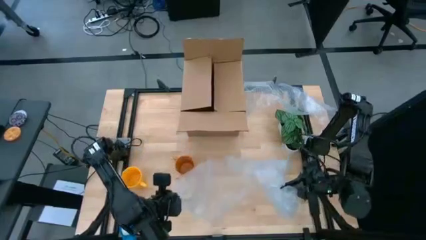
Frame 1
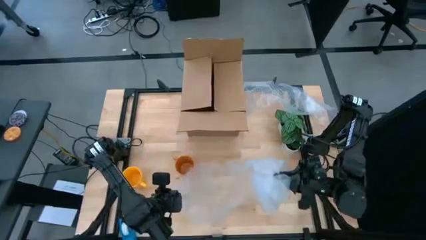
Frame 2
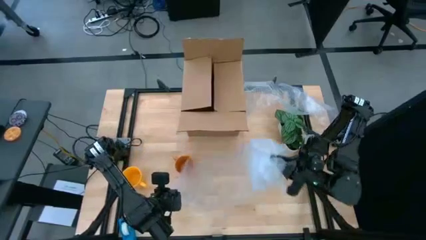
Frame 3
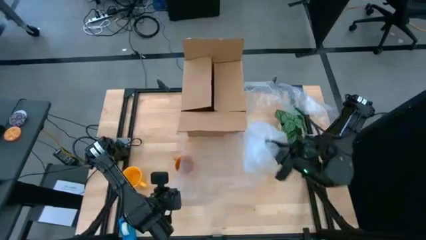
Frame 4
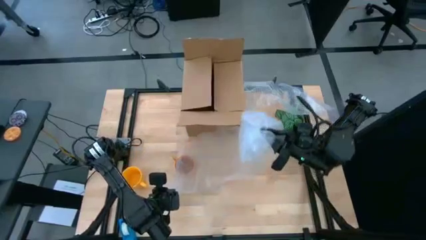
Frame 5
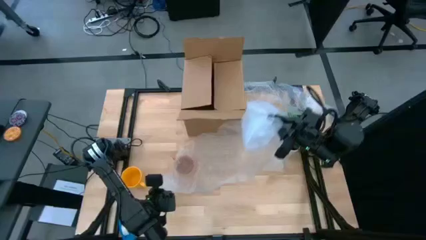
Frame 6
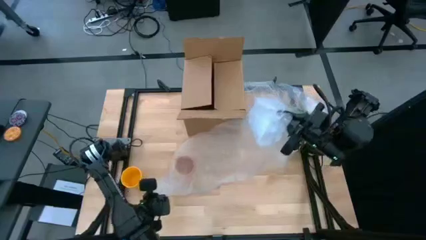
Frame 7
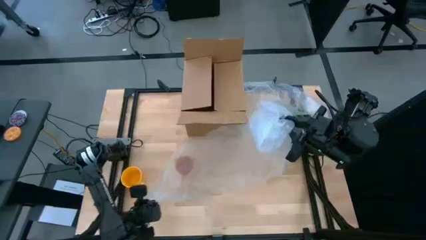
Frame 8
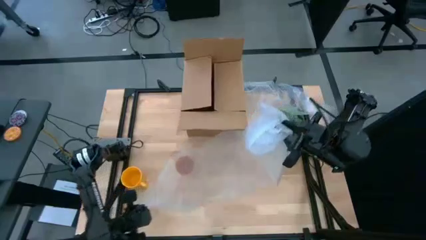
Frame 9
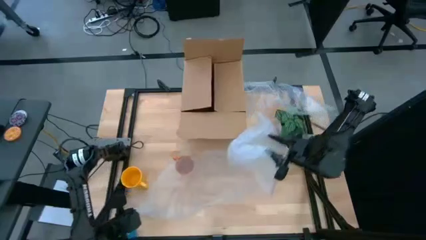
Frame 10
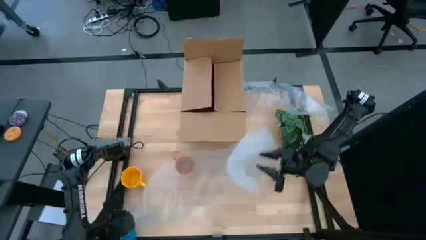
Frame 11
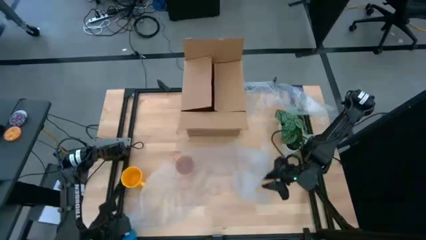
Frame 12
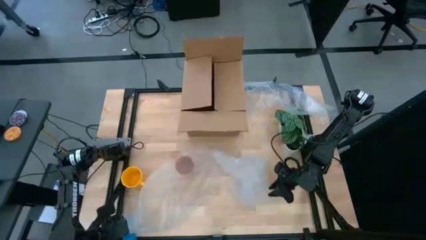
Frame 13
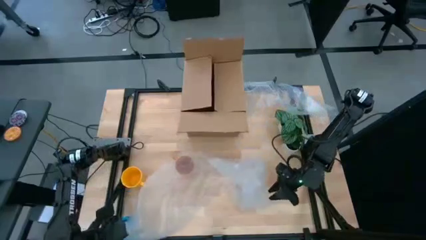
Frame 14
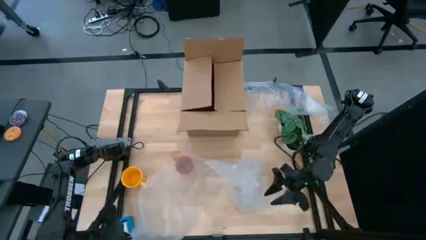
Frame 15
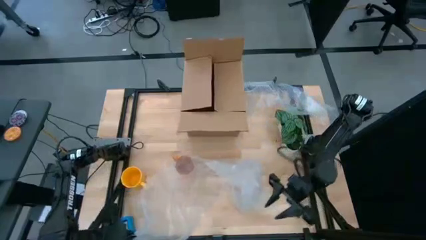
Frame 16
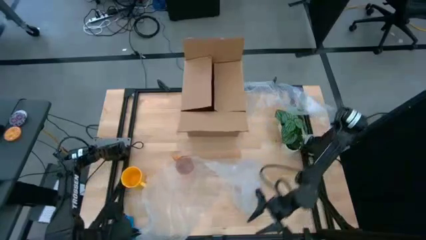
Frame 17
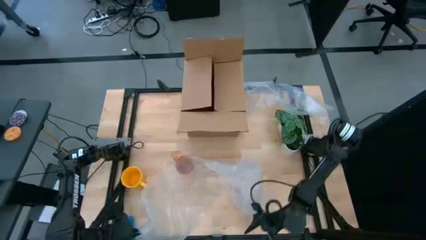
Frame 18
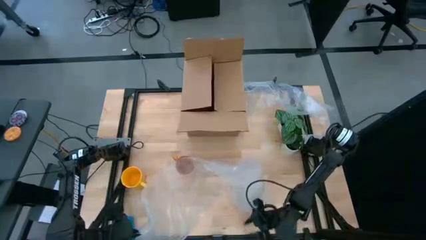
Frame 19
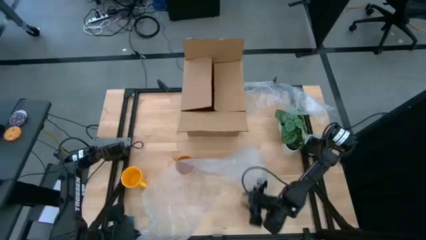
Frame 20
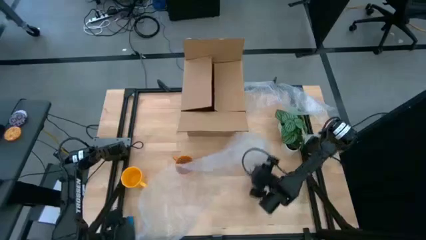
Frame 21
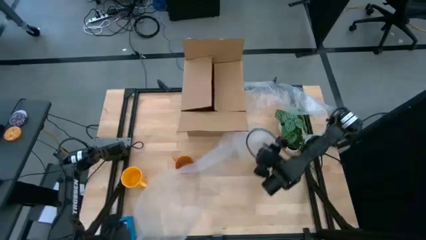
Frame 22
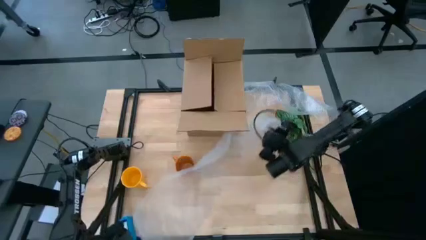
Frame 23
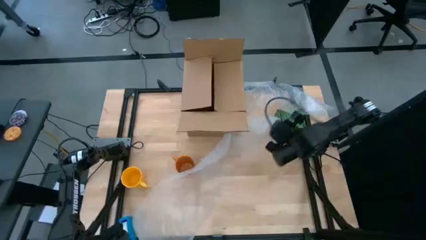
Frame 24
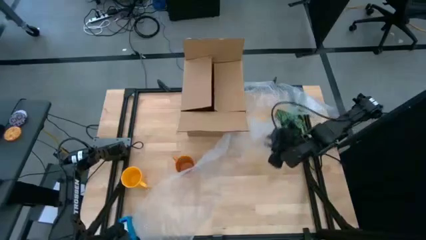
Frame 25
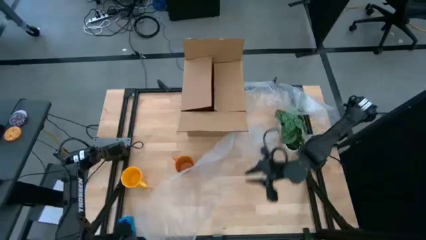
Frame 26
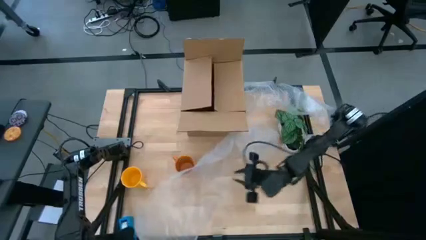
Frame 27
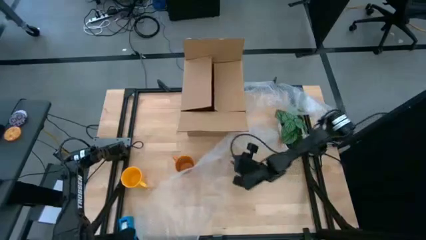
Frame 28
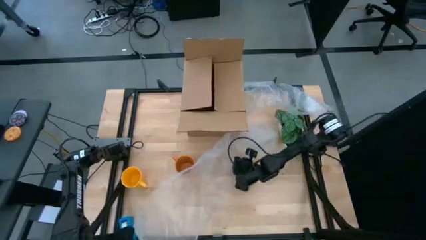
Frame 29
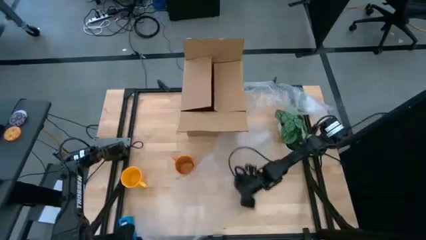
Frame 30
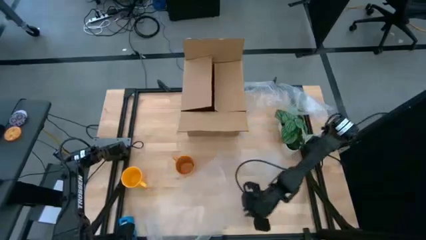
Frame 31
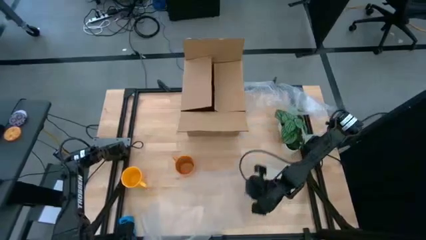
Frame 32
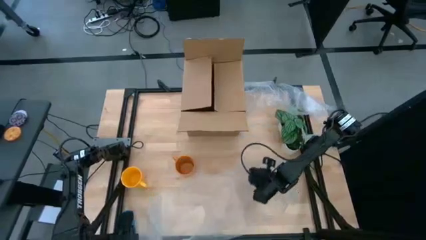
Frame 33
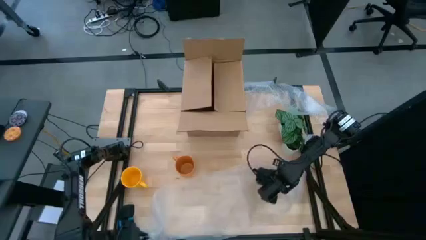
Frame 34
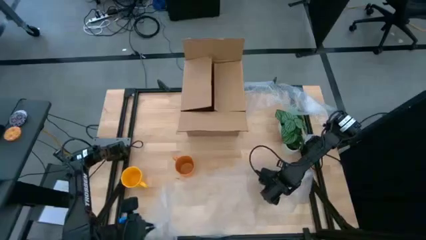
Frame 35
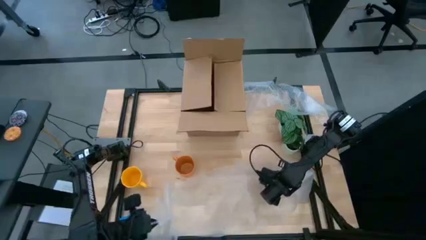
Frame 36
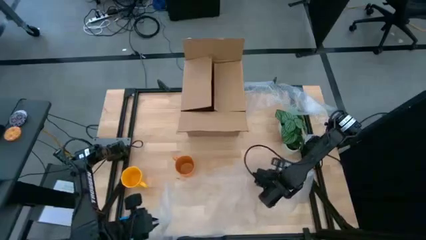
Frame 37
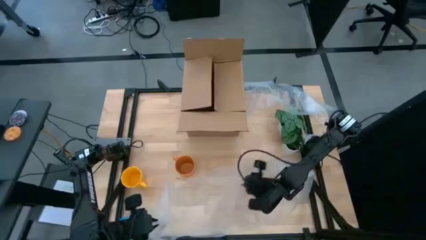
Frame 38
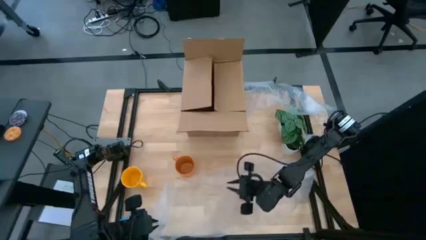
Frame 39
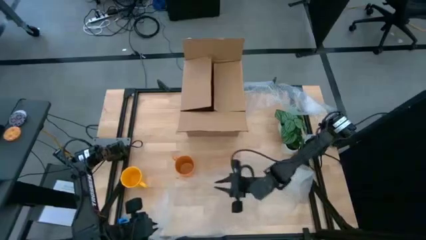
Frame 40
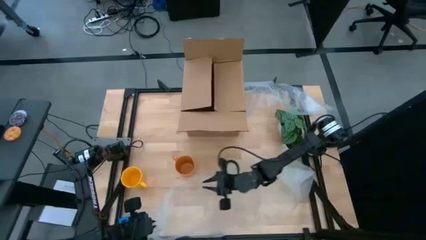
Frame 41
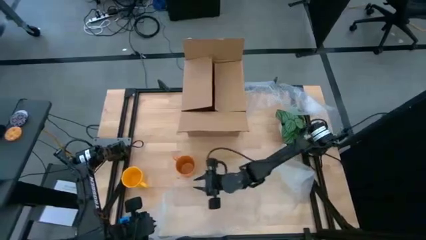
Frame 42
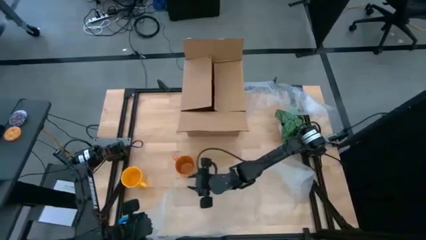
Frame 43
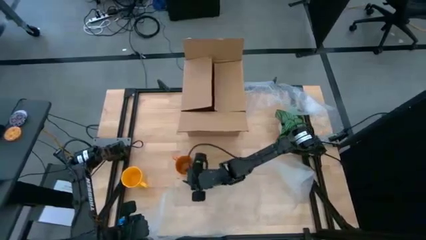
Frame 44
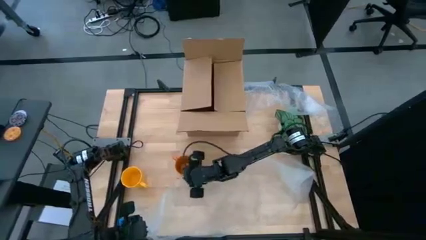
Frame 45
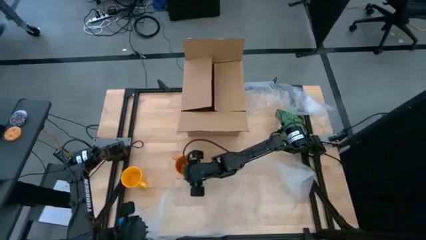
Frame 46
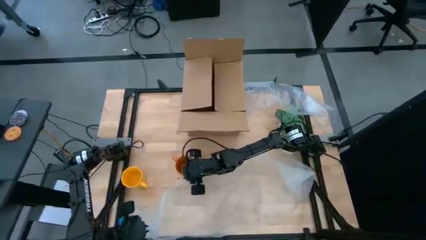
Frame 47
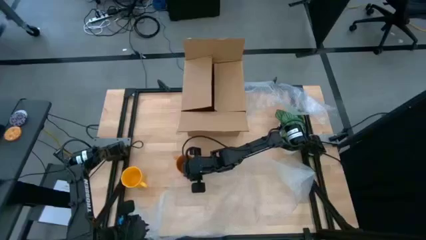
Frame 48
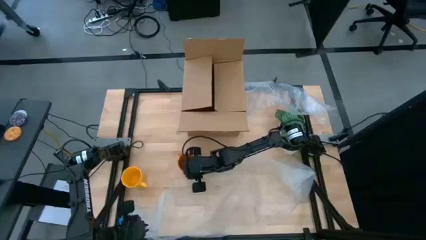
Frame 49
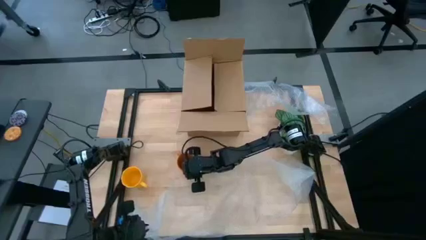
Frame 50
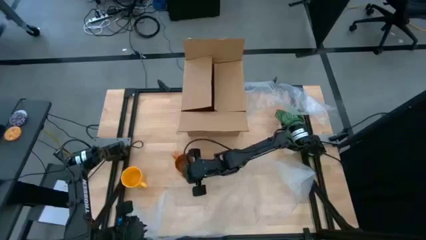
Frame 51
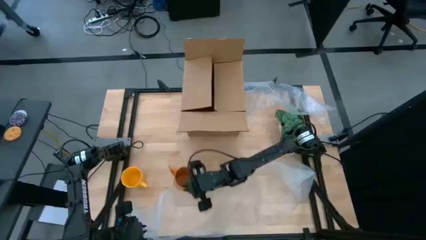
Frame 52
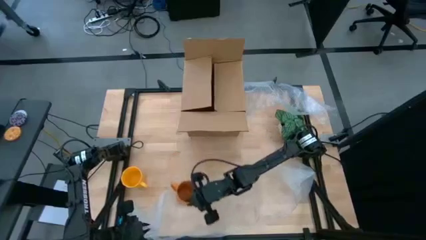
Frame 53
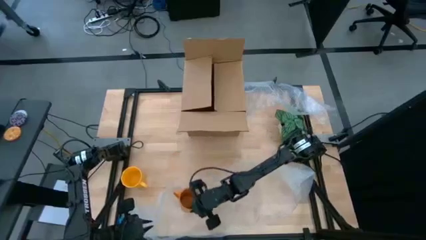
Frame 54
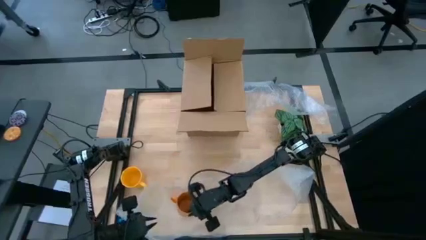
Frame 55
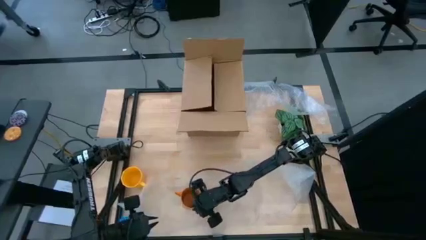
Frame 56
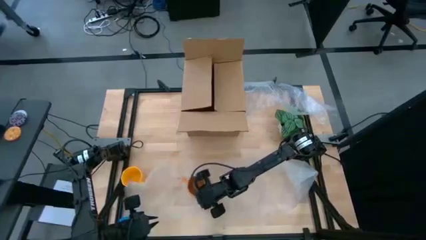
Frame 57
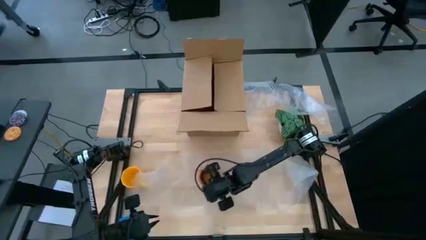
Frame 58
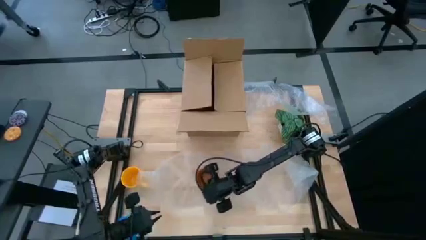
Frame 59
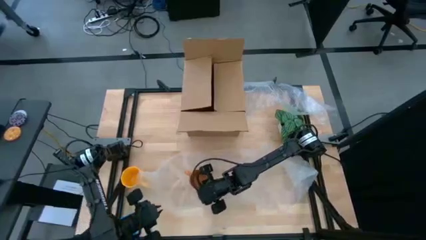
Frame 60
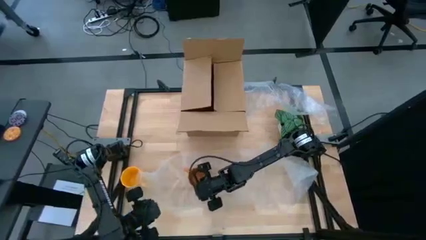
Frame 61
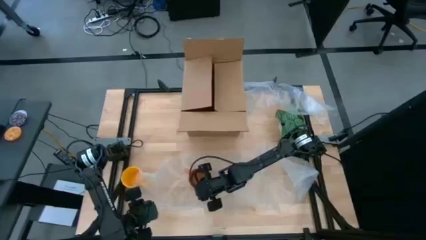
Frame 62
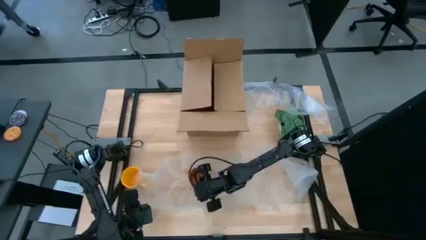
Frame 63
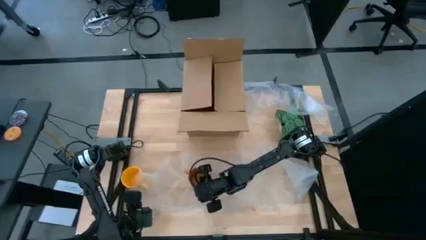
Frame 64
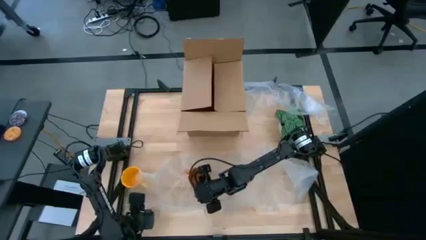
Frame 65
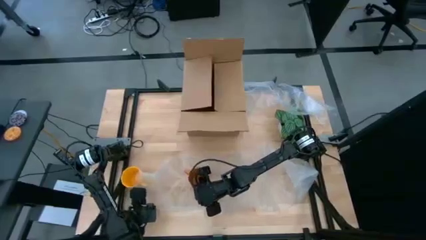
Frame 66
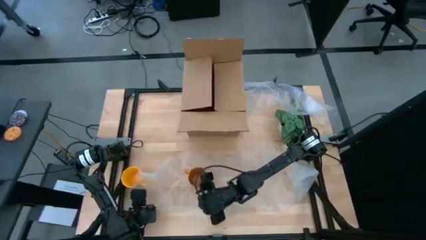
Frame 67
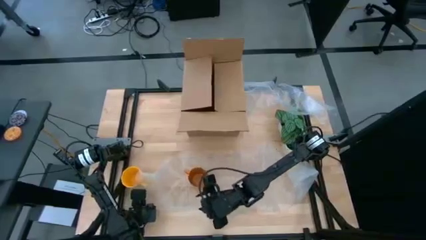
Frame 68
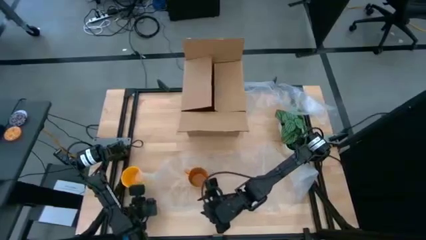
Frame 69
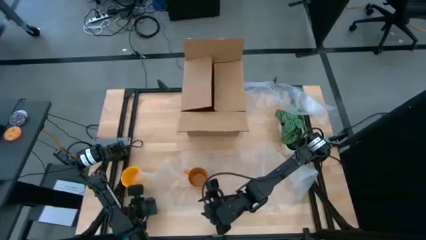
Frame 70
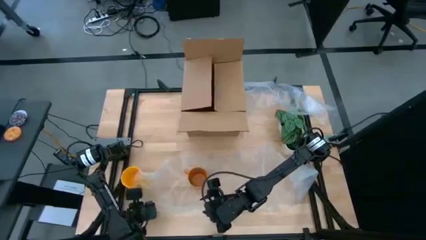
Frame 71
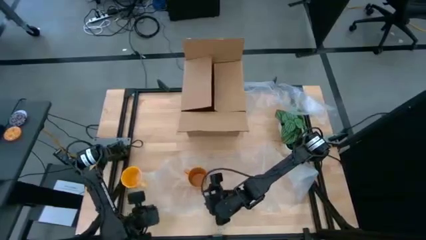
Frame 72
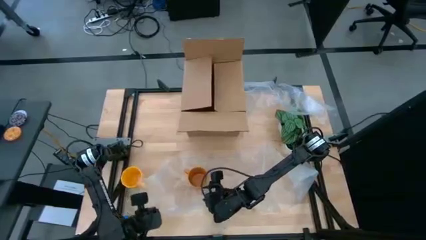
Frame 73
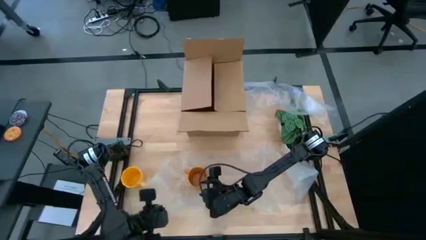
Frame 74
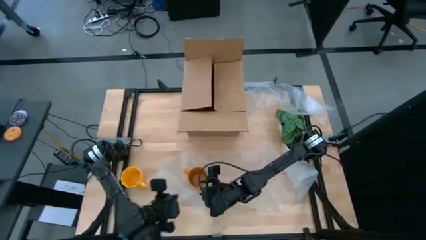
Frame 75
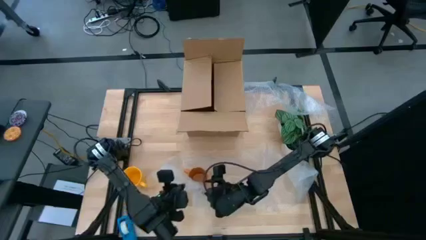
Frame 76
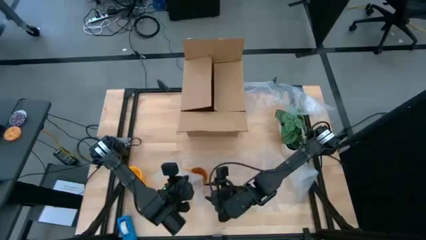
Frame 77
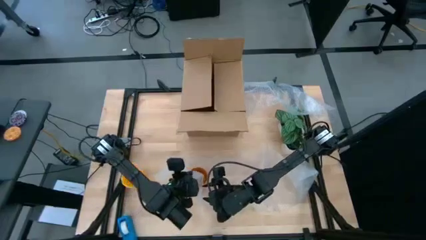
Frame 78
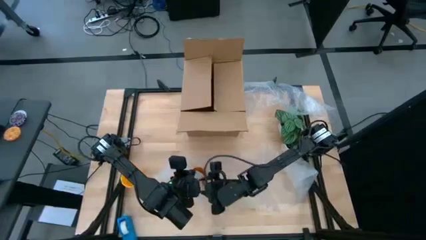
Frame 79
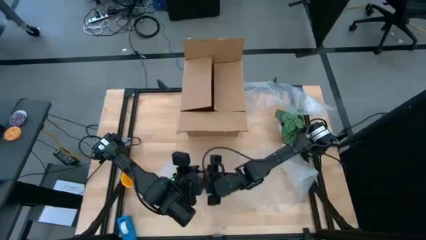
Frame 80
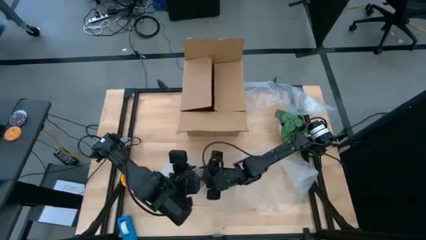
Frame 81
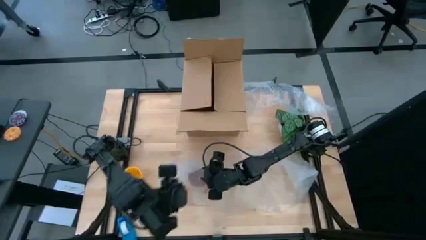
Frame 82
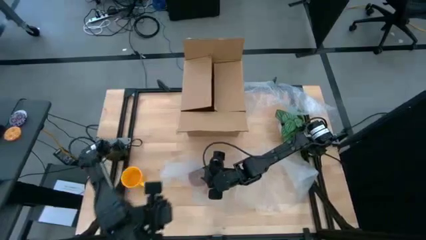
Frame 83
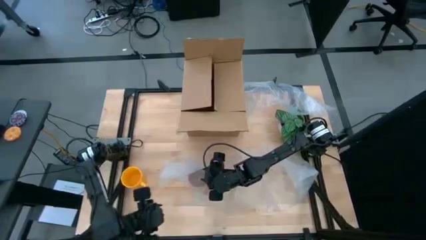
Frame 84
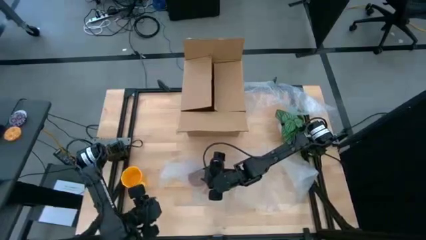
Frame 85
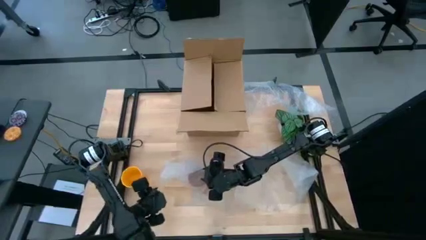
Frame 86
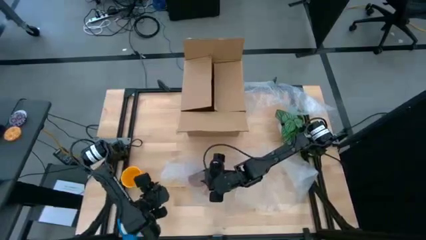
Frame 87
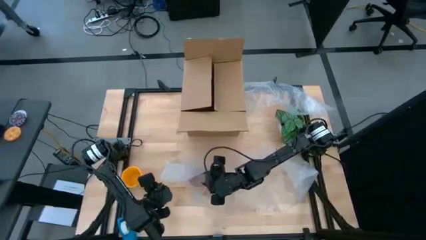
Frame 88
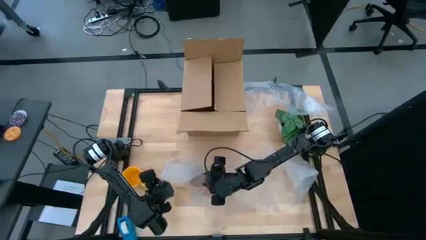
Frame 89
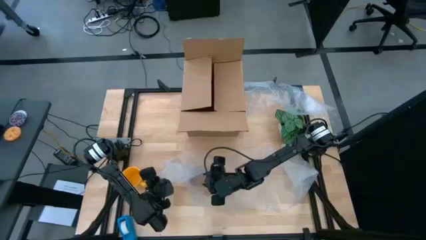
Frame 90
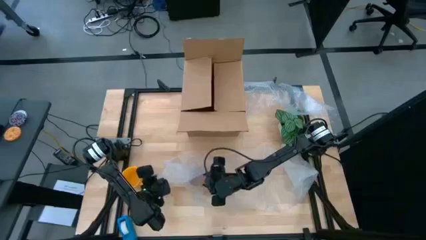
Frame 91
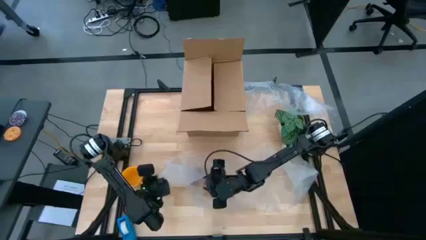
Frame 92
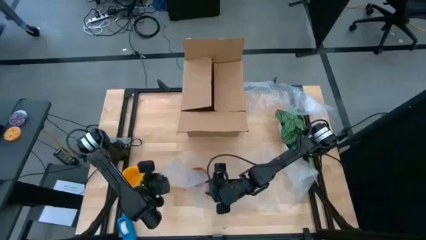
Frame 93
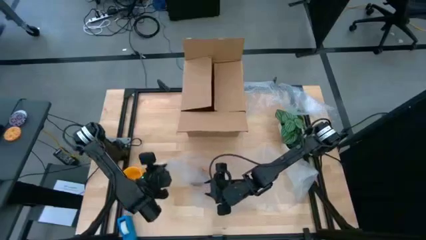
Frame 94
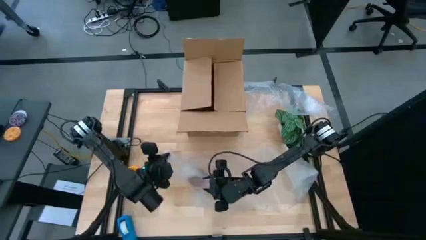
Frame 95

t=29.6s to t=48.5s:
Task: wrap mug
Wrap the orange cup with the bubble wrap
